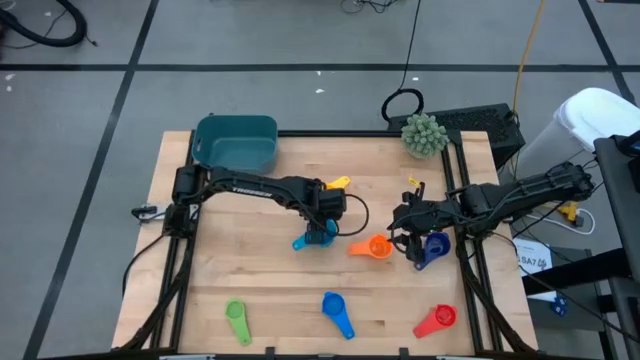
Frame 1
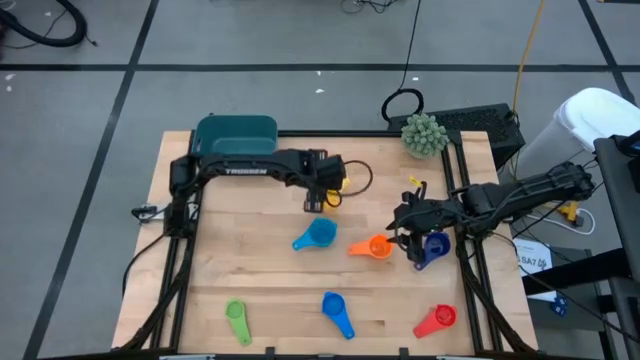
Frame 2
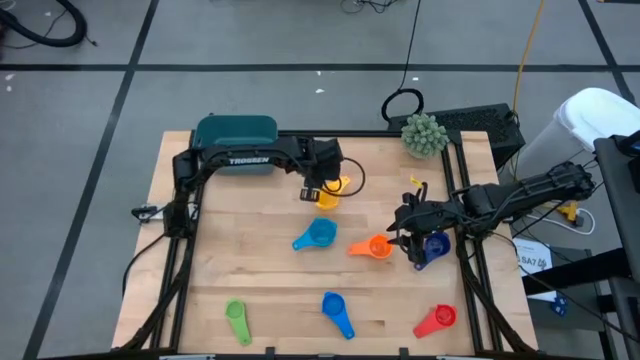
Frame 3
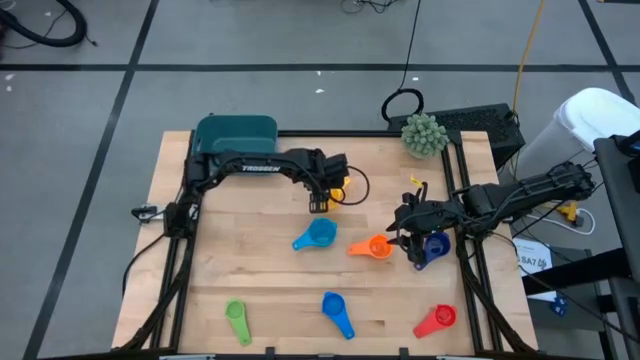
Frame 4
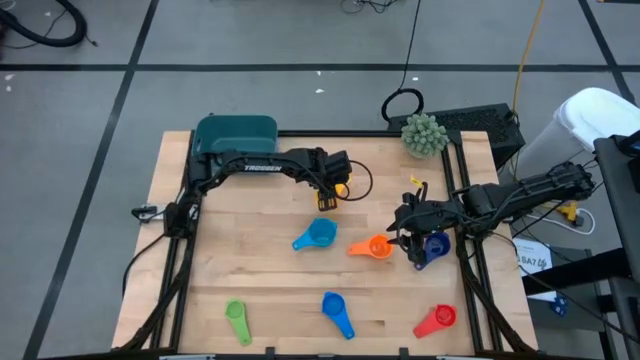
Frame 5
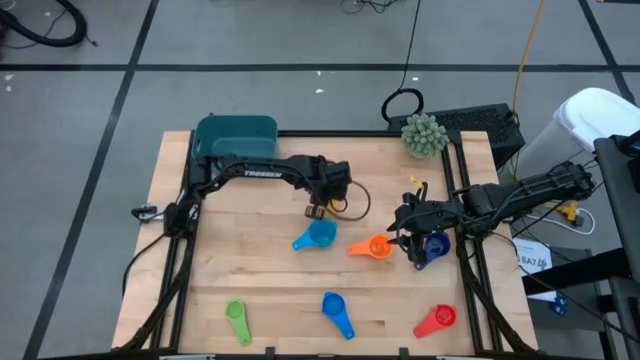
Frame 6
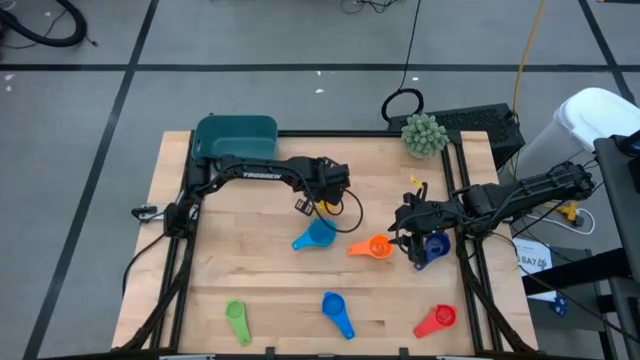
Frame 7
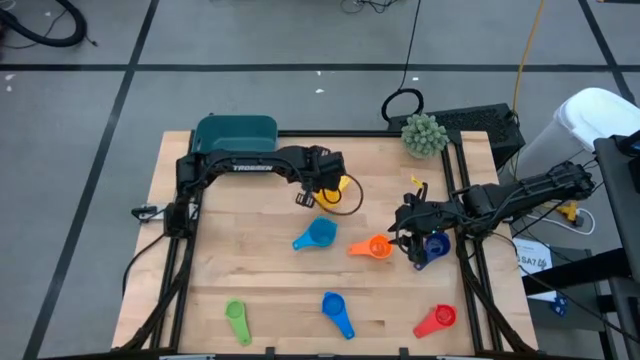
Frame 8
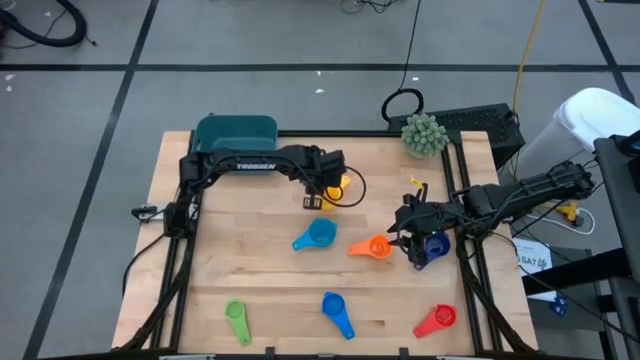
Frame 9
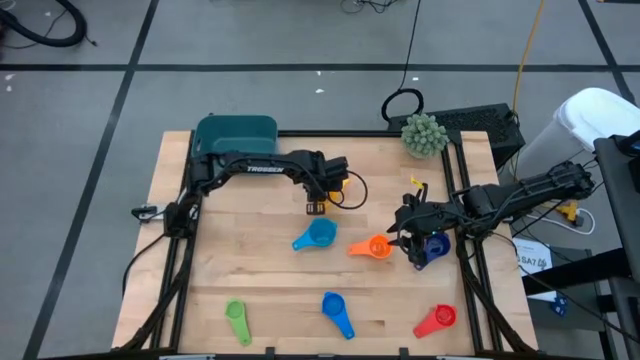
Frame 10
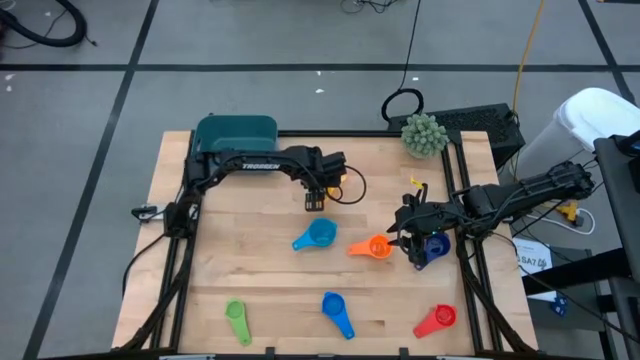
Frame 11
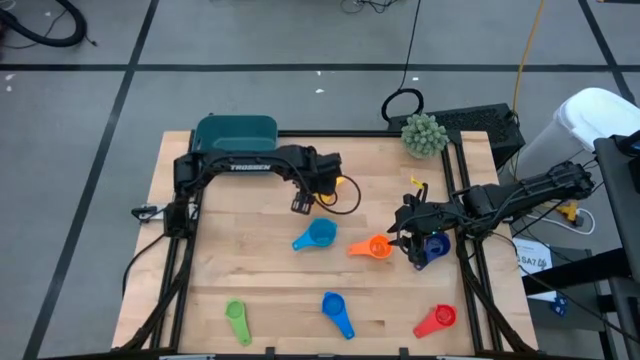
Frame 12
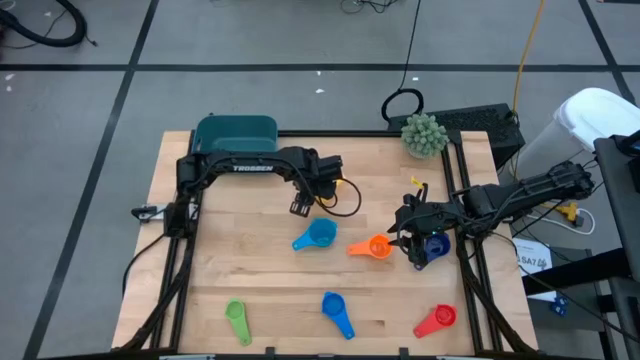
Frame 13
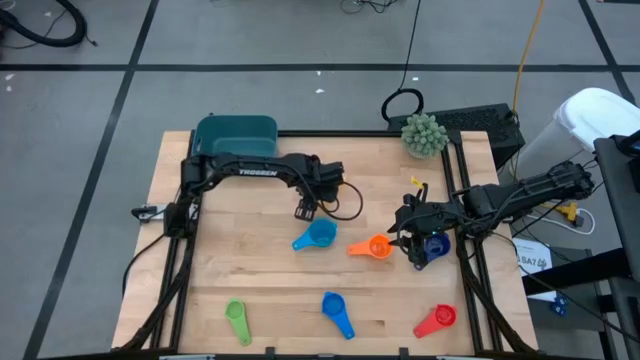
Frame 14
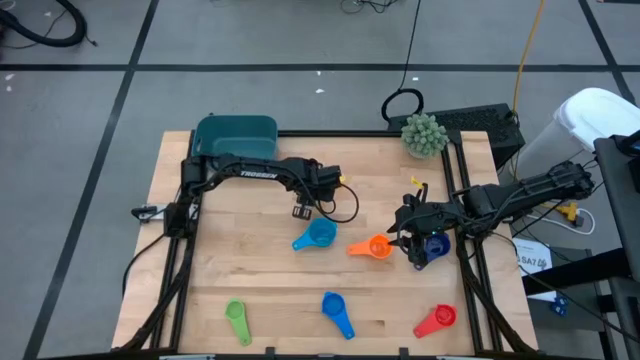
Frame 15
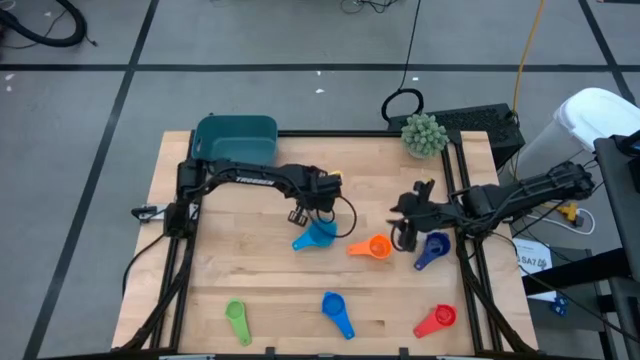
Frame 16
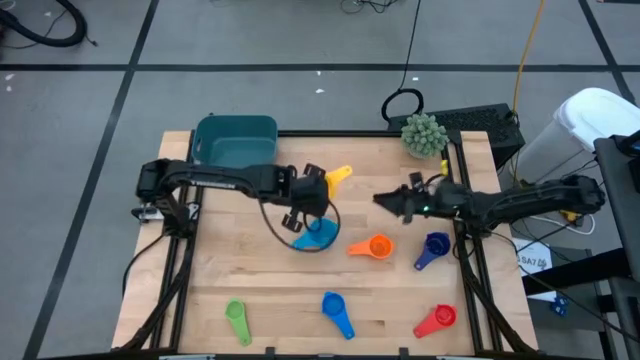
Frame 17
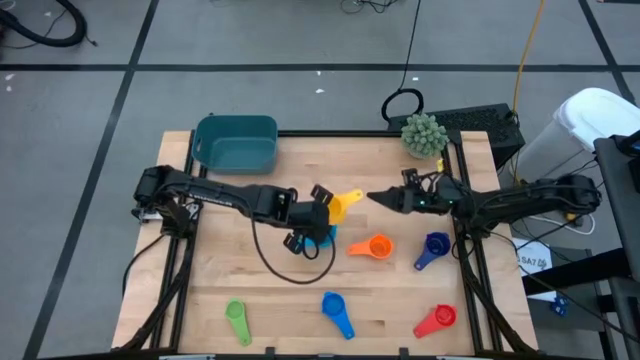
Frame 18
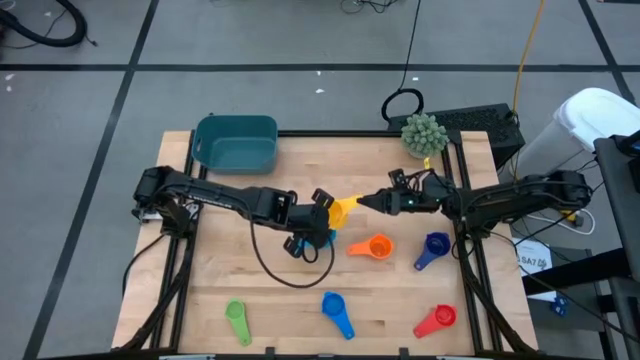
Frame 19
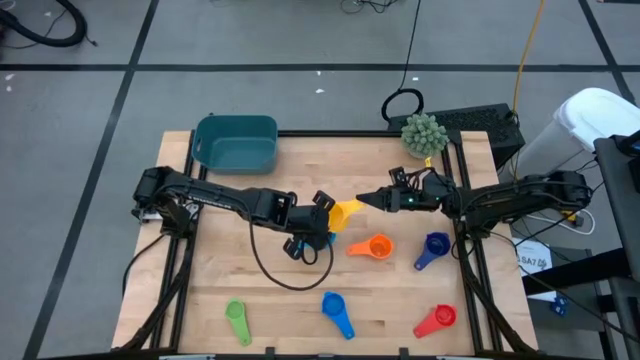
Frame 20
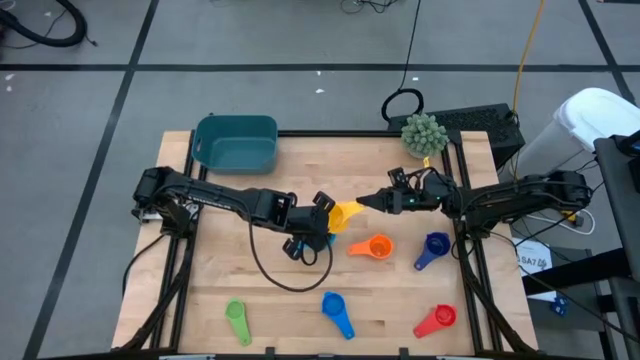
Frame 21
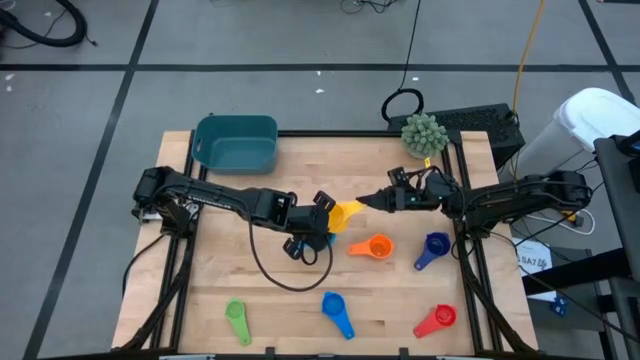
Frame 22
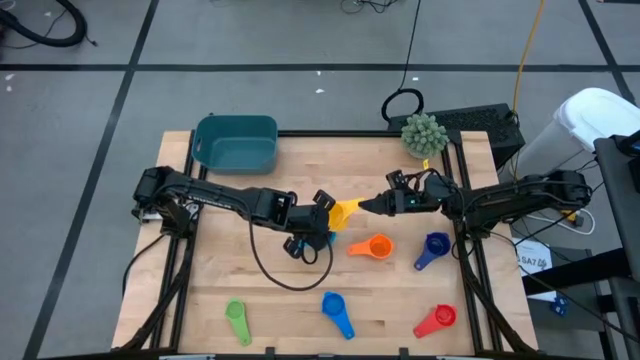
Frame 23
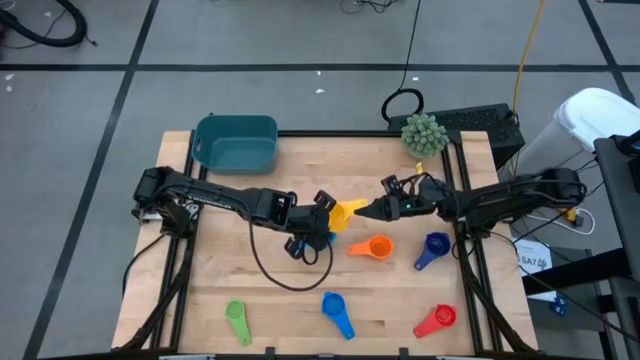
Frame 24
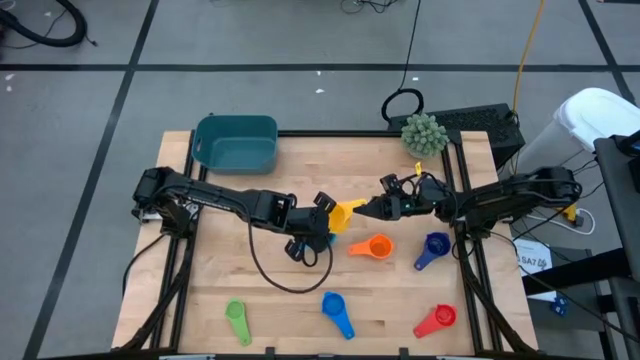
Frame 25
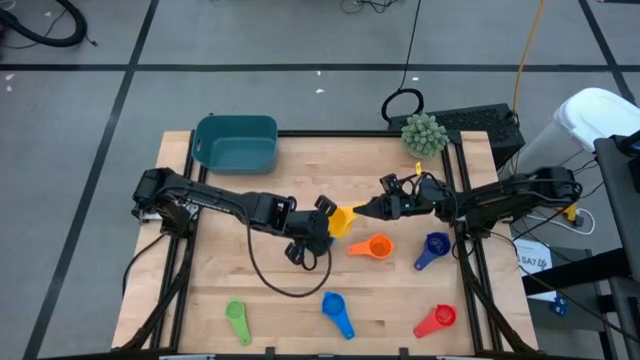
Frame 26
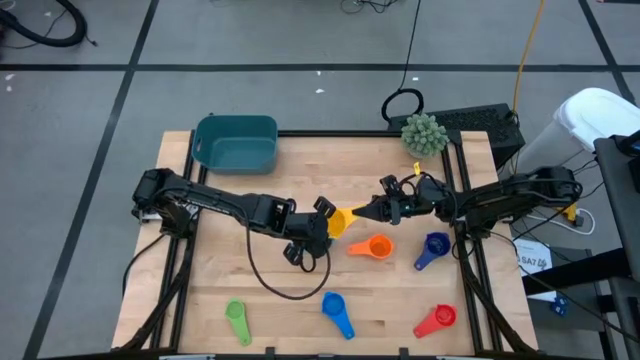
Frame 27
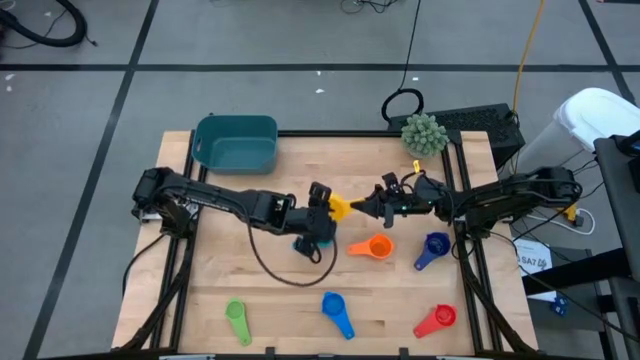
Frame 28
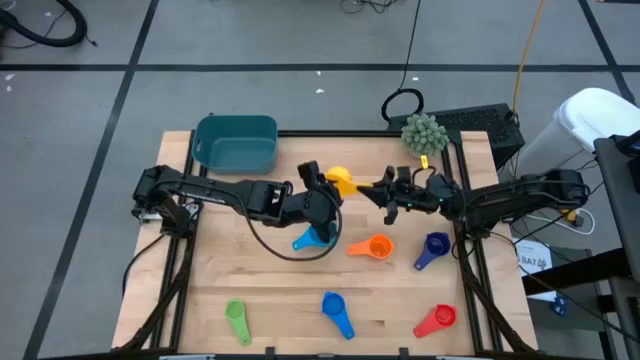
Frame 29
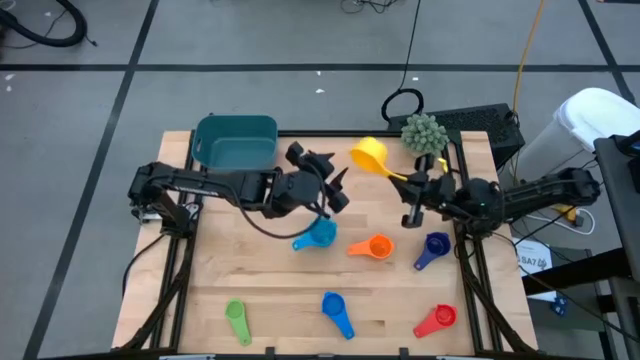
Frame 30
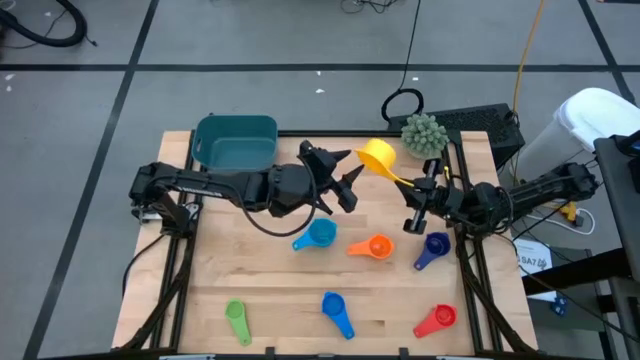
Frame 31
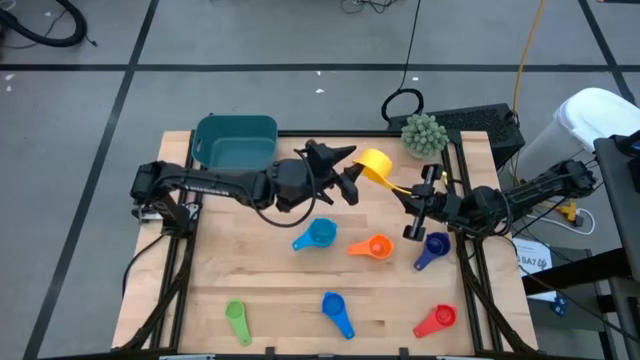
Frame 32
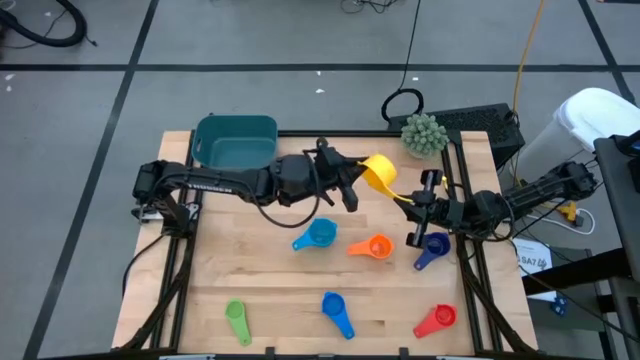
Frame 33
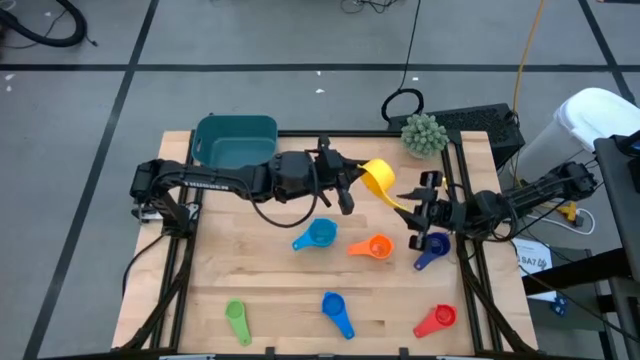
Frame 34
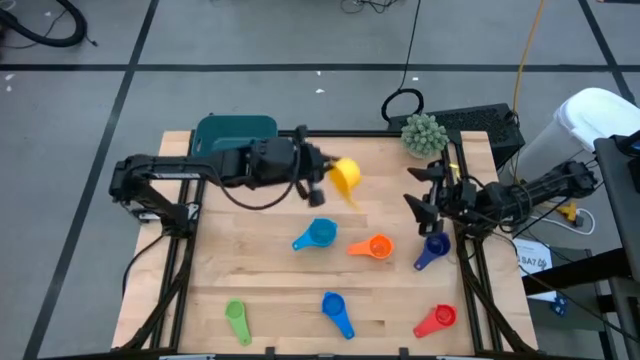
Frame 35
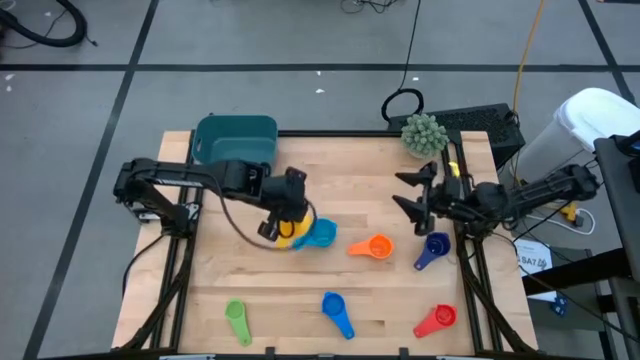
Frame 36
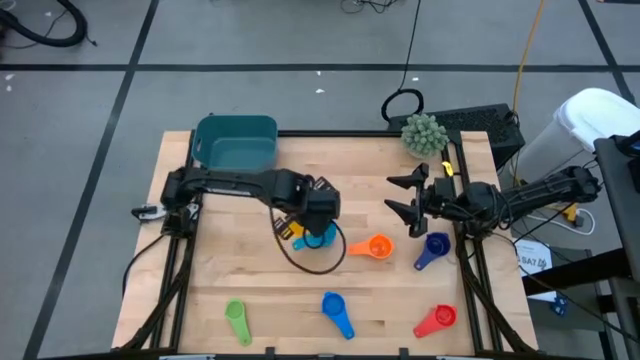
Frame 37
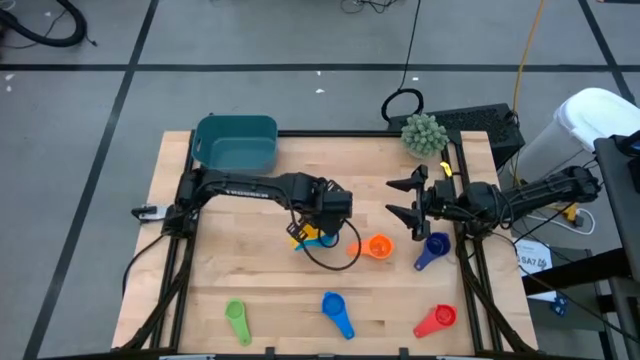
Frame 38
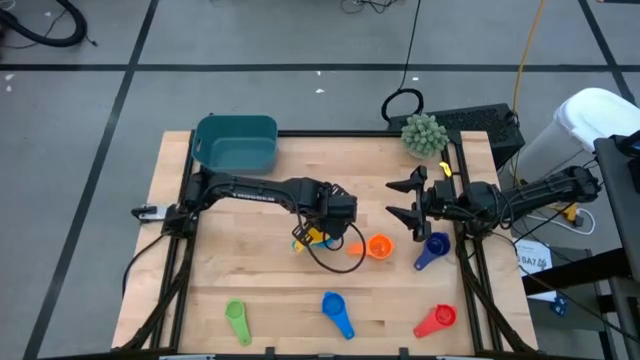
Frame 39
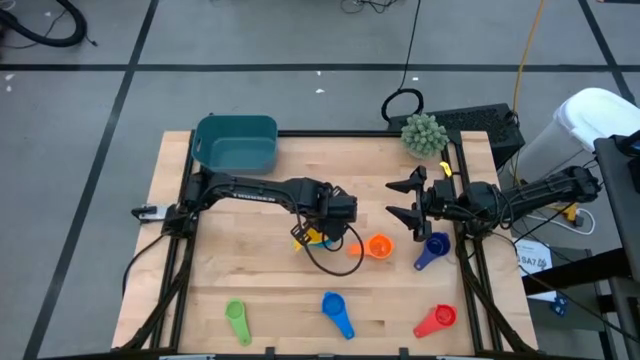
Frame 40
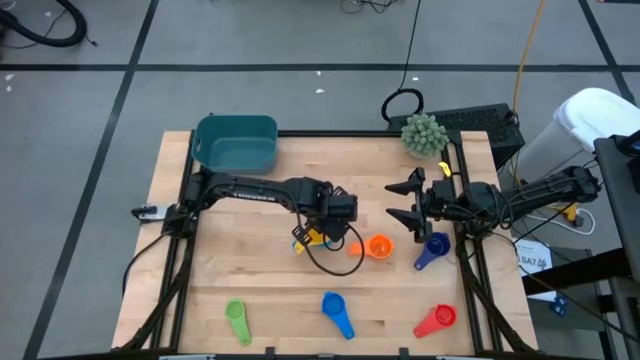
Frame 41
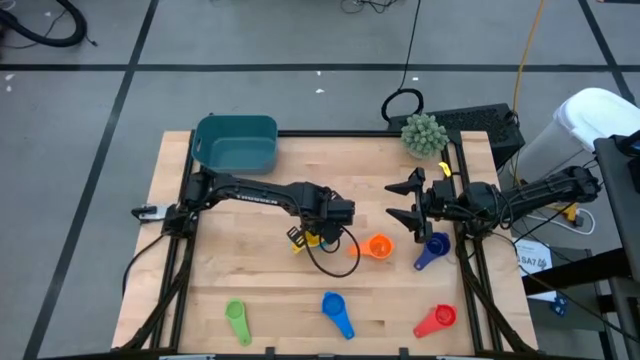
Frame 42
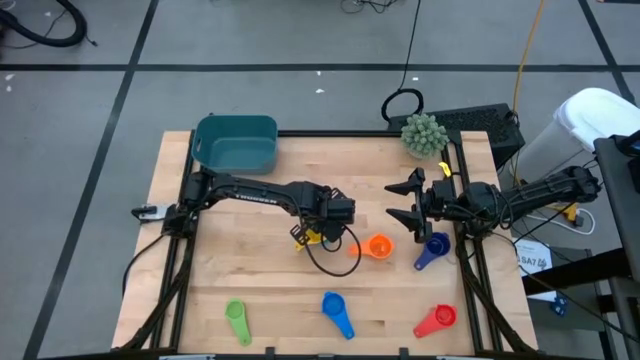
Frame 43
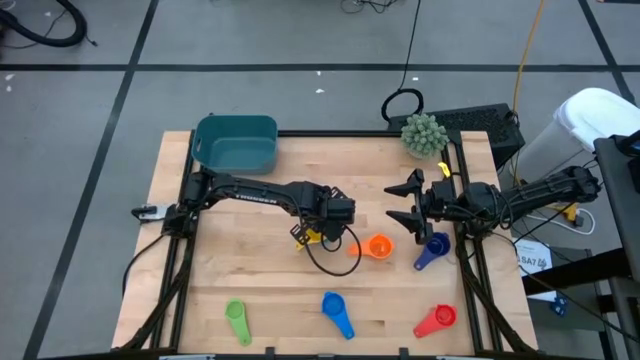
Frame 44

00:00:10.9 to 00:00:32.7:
Task: Nest measuring cups in basket
Stack the yellow measuring cup on top of the light blue measuring cup
